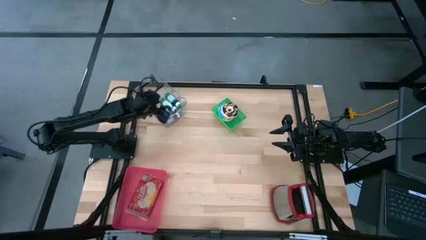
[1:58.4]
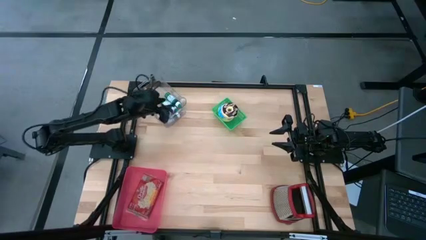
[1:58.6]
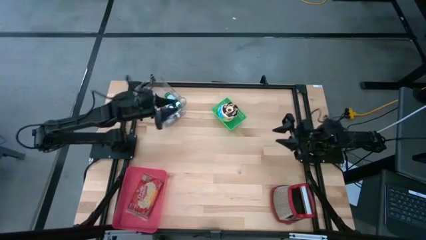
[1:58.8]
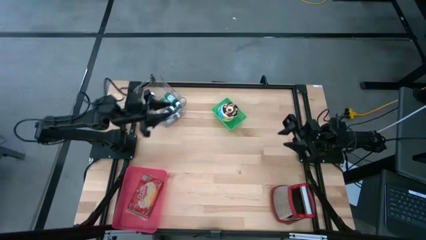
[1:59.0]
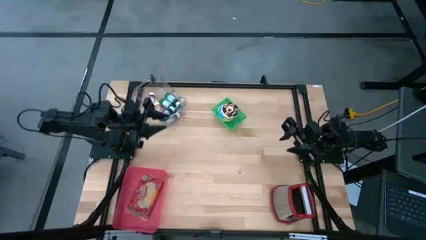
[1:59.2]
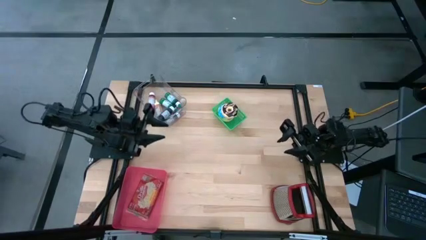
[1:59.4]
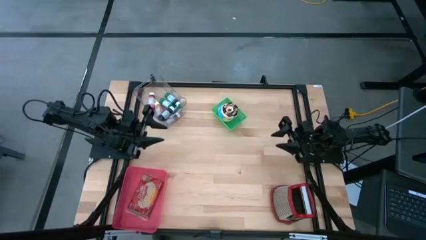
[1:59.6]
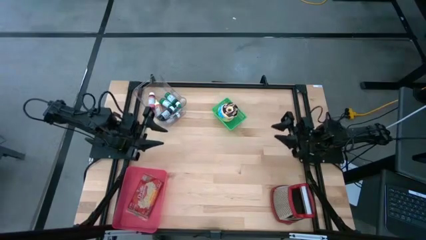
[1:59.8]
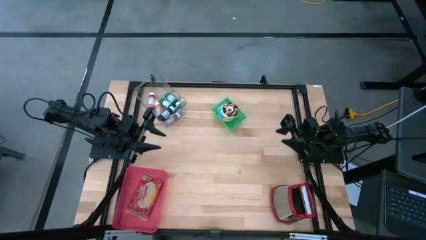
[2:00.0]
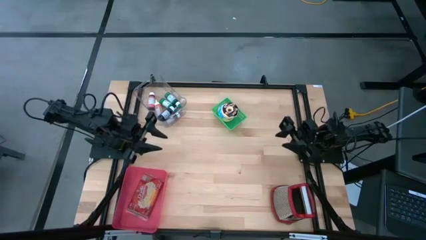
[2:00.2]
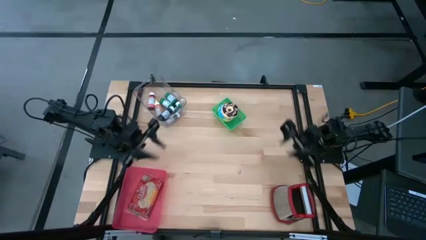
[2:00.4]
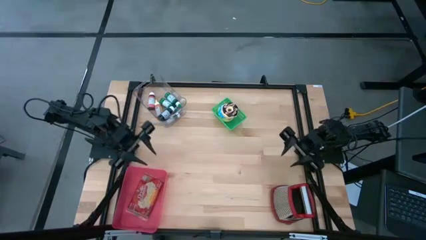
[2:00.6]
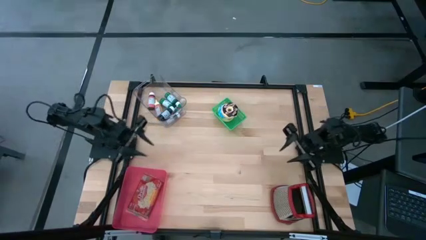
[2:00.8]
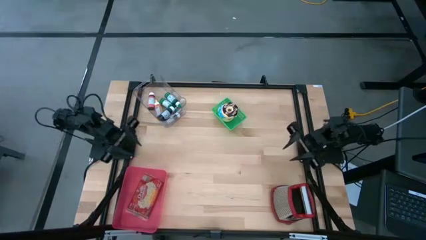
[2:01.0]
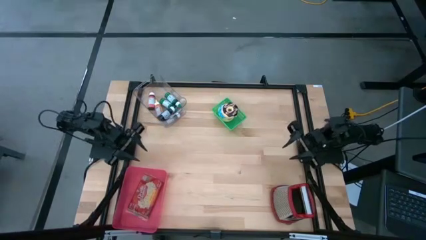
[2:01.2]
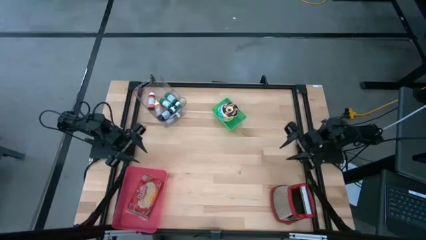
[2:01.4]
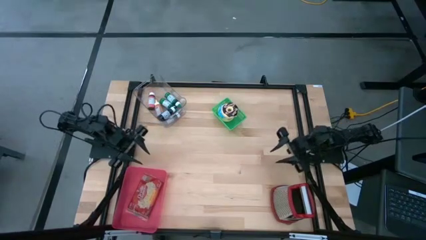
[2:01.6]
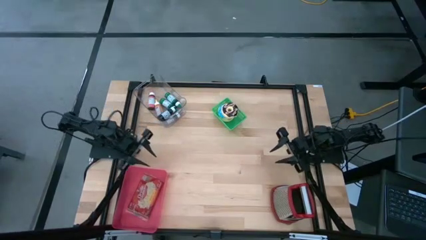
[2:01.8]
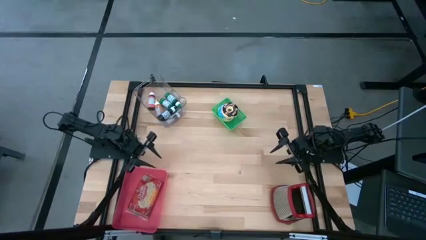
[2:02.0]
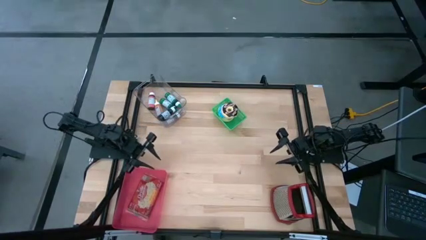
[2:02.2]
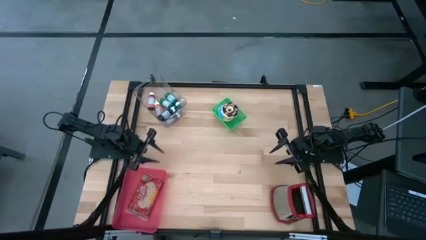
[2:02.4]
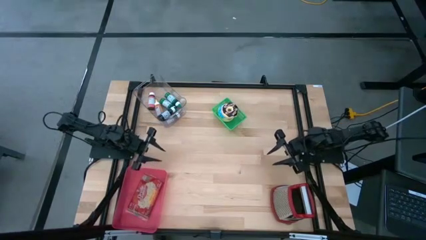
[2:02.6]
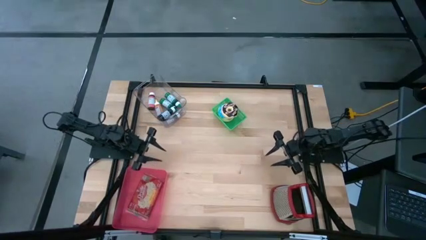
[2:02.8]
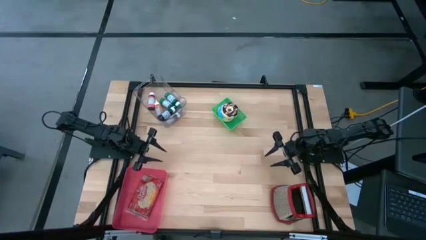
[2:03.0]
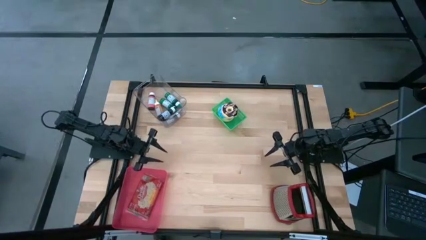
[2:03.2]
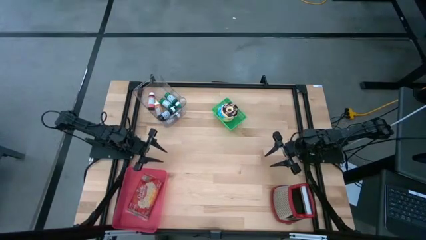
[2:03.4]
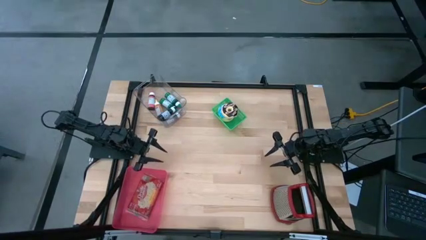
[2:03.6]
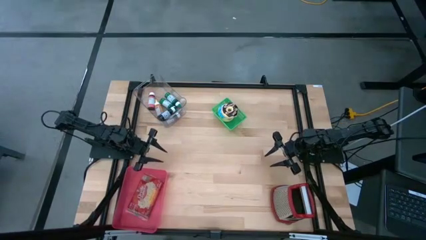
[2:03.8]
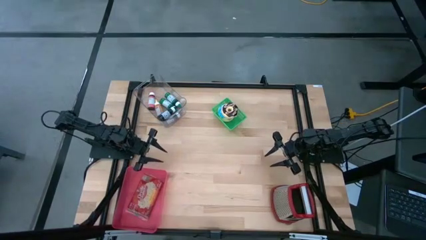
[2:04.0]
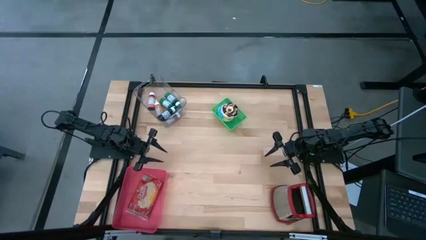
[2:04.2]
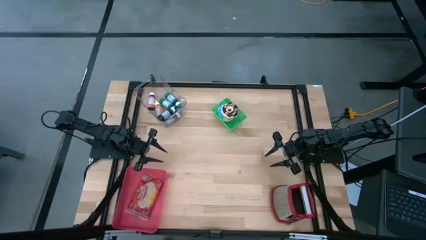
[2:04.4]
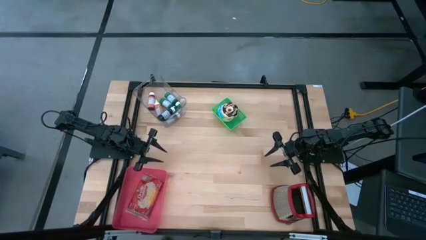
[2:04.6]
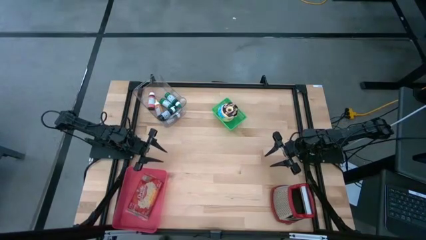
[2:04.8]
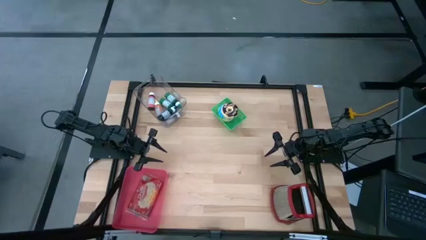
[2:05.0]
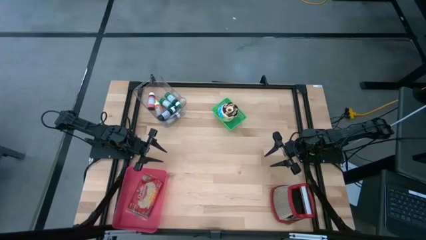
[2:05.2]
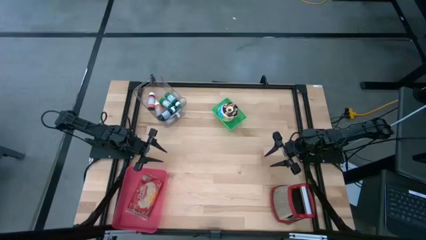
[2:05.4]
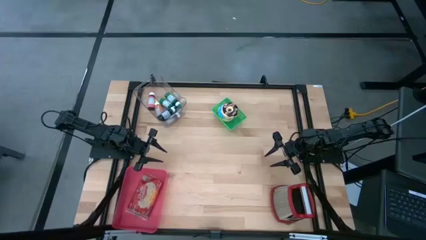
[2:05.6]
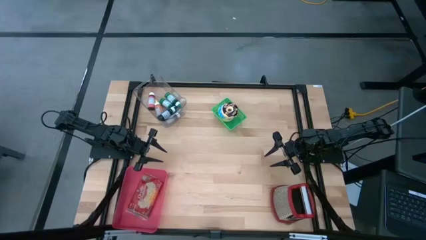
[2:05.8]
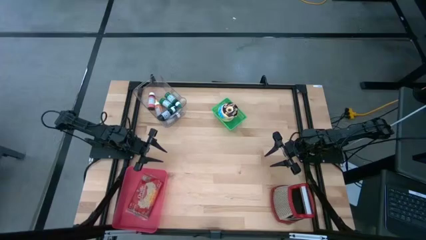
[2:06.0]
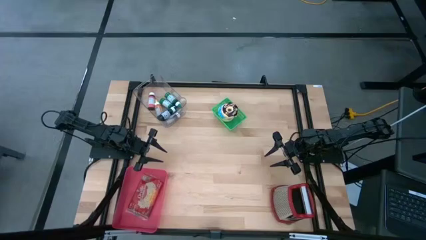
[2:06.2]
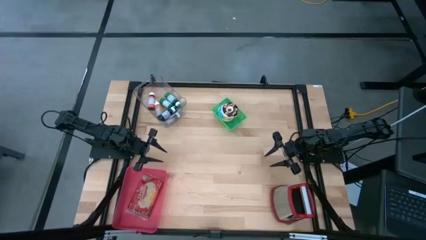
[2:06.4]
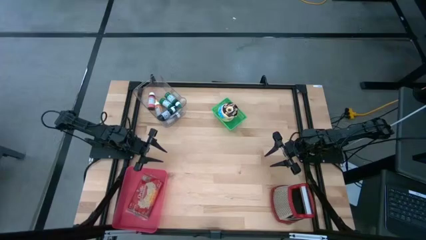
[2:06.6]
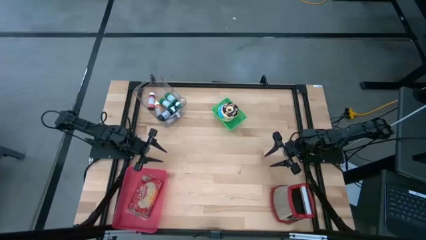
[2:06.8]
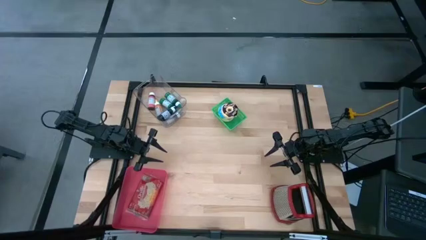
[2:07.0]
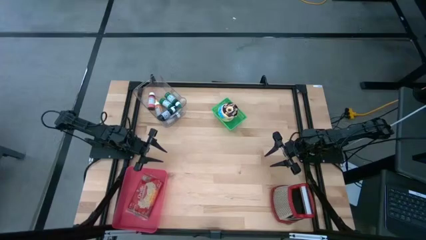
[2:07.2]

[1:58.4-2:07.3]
Return to Home Position
